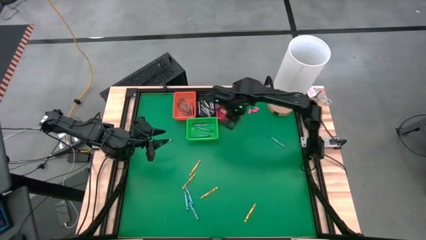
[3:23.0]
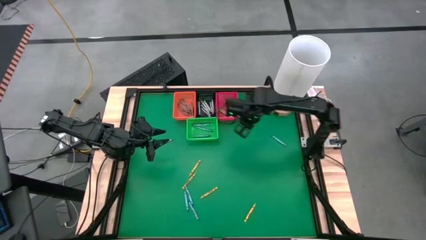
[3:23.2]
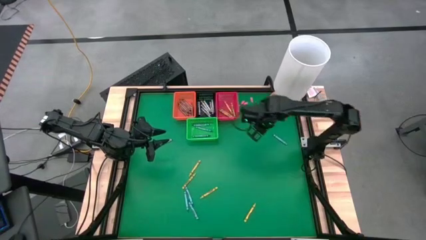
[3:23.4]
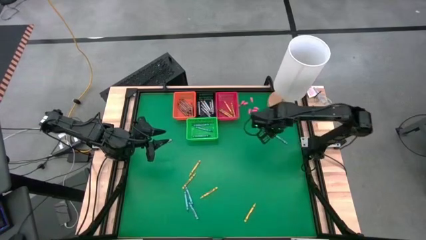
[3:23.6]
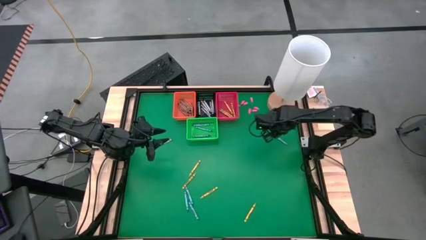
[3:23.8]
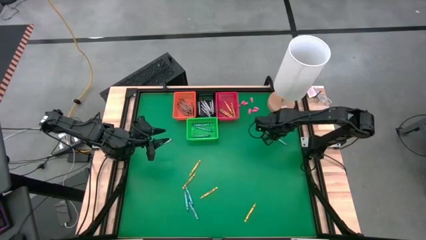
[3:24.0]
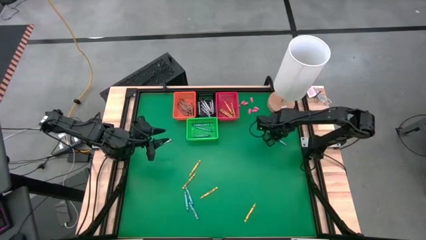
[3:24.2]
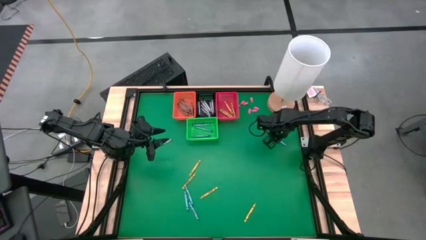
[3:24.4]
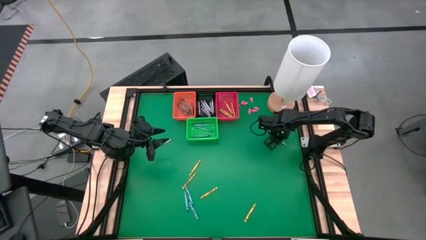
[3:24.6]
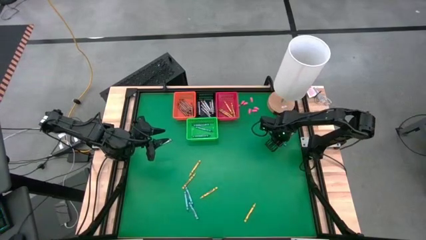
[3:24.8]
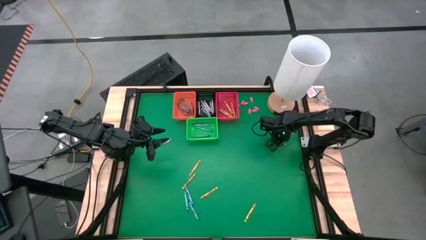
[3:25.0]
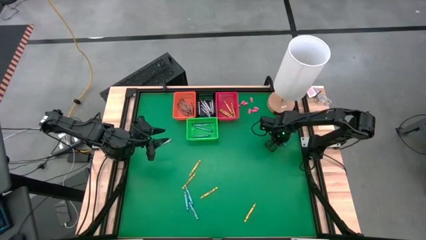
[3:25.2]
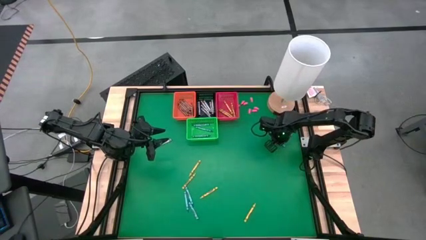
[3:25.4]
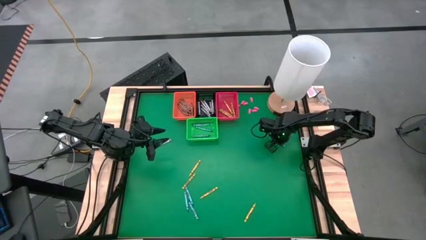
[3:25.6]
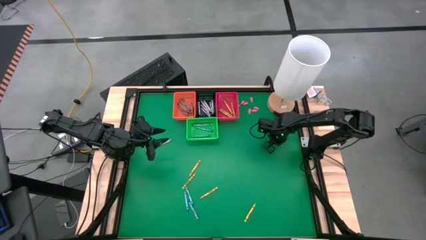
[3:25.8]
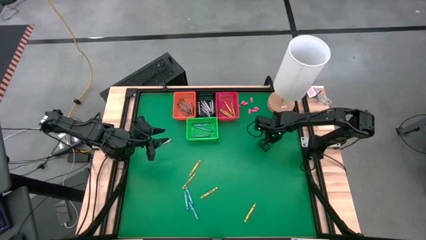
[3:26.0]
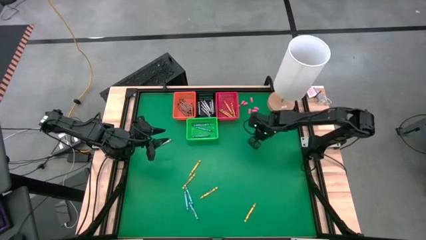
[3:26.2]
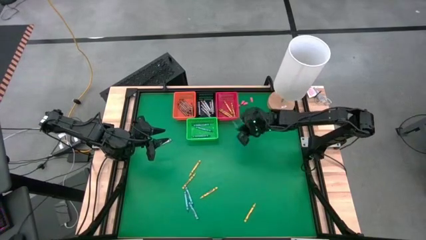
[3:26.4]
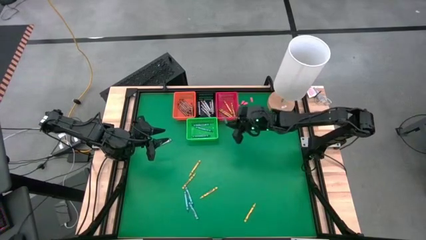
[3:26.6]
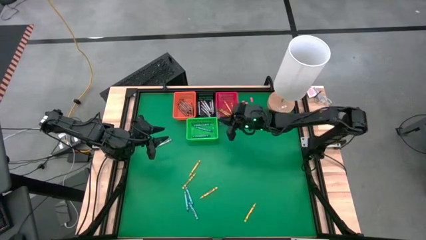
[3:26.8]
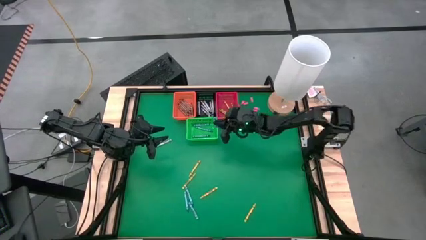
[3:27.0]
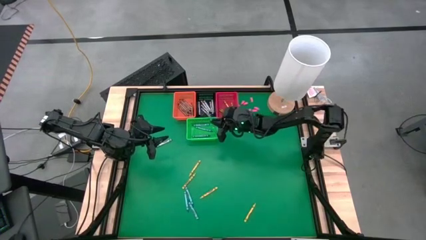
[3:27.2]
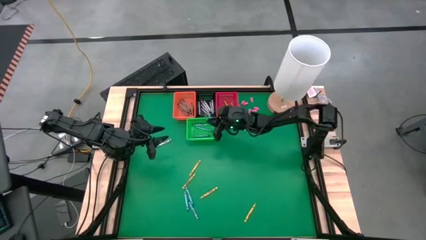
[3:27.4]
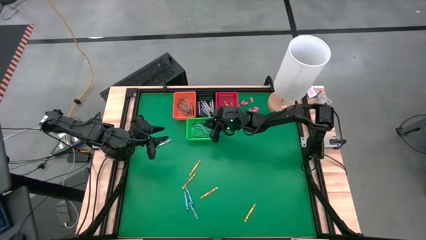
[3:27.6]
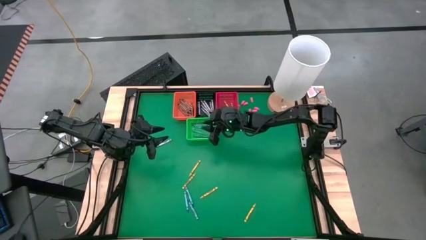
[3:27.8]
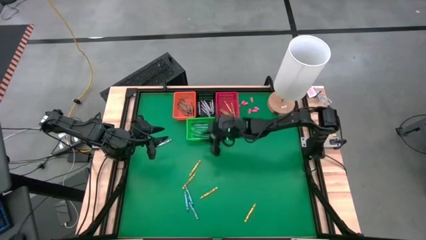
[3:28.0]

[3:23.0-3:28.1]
Task: Sort crayons
Put a blue crayon in the green basket

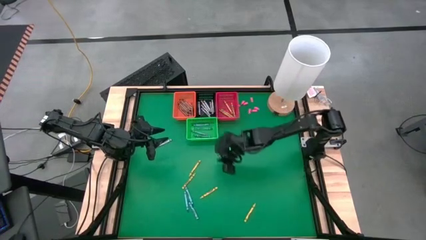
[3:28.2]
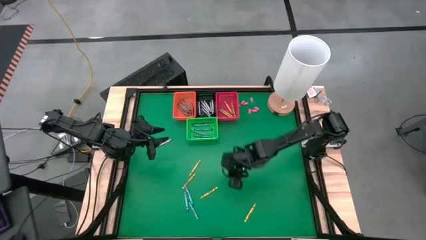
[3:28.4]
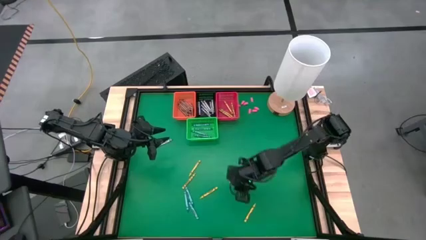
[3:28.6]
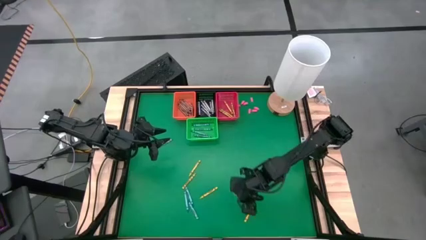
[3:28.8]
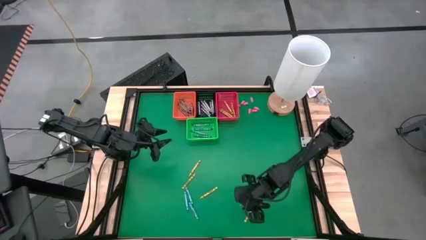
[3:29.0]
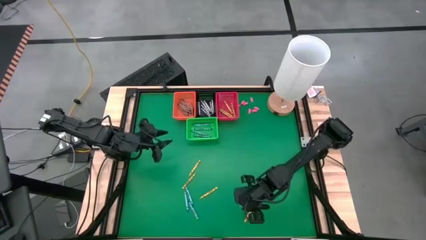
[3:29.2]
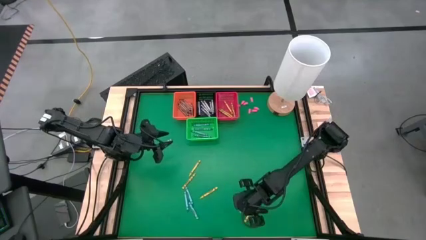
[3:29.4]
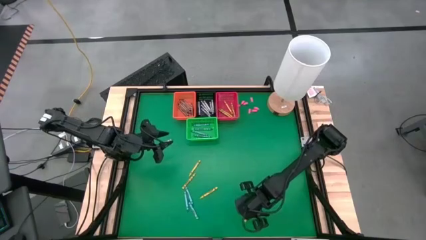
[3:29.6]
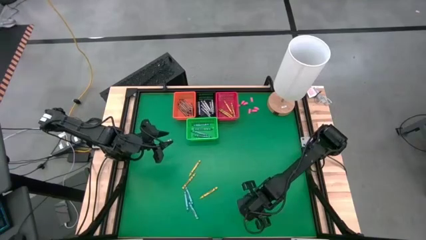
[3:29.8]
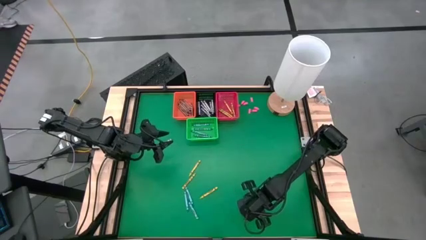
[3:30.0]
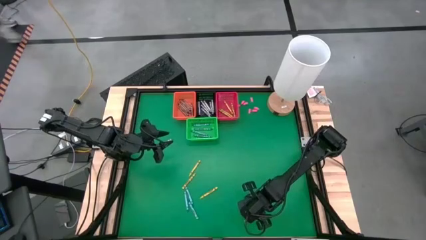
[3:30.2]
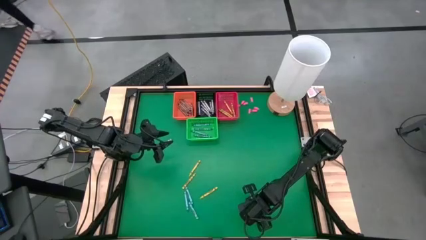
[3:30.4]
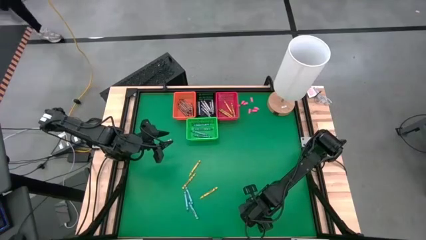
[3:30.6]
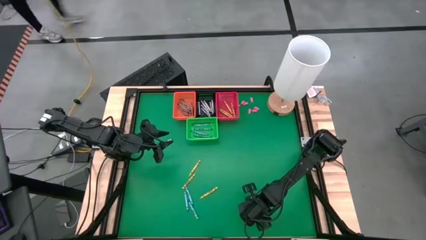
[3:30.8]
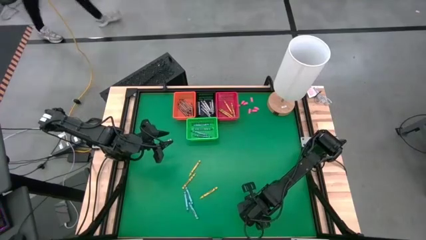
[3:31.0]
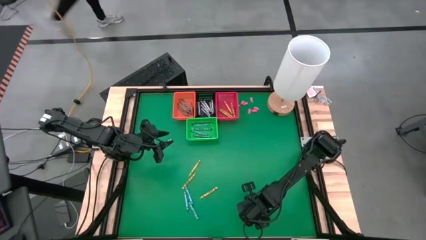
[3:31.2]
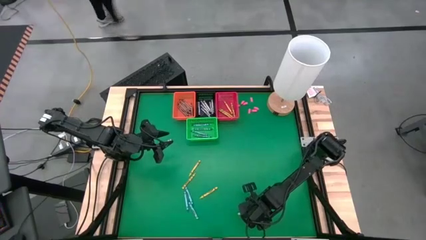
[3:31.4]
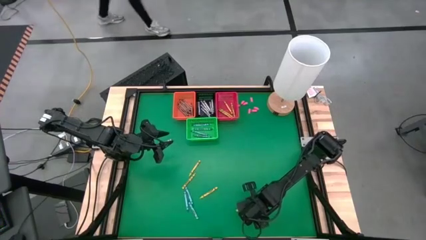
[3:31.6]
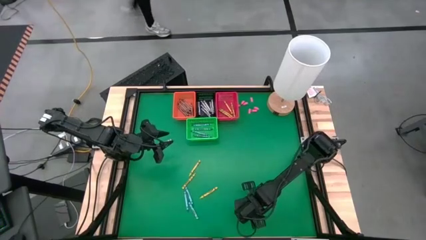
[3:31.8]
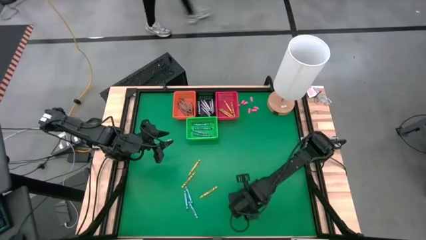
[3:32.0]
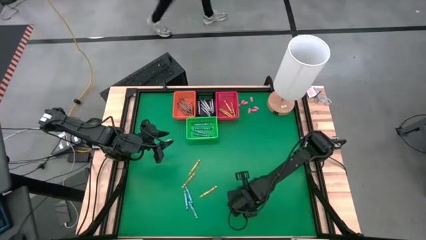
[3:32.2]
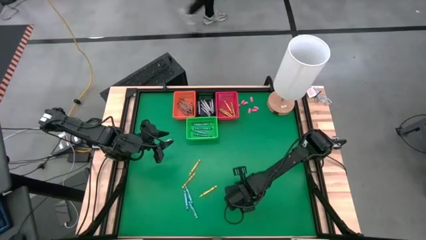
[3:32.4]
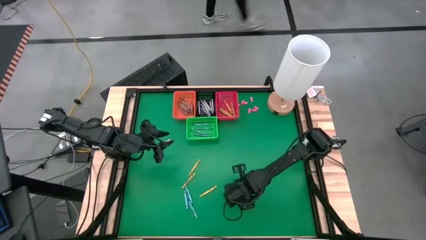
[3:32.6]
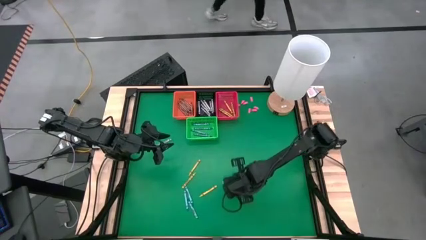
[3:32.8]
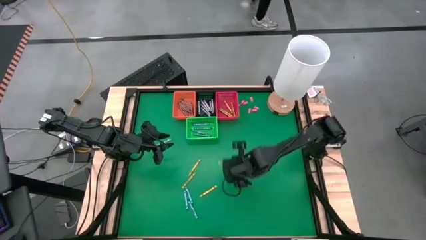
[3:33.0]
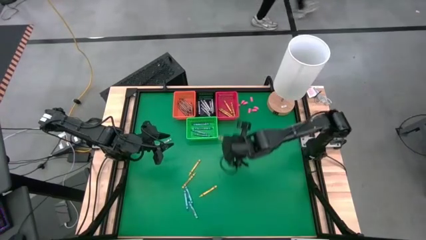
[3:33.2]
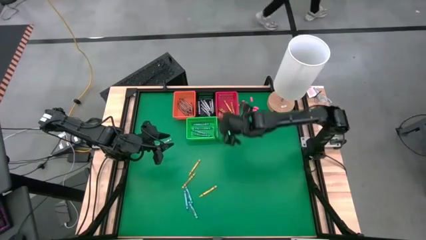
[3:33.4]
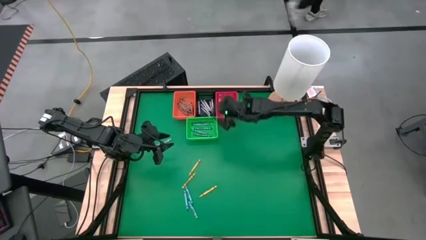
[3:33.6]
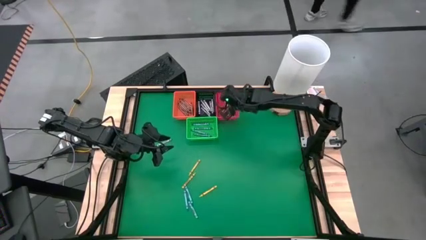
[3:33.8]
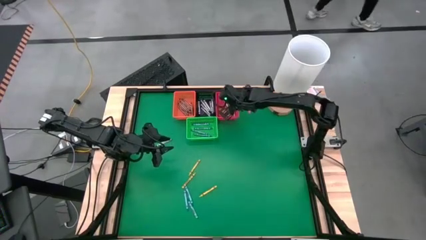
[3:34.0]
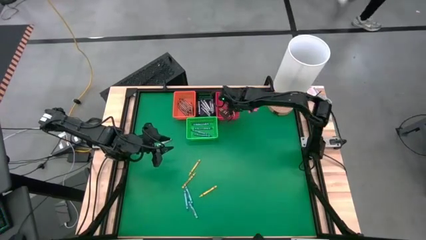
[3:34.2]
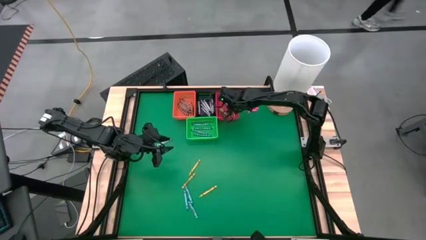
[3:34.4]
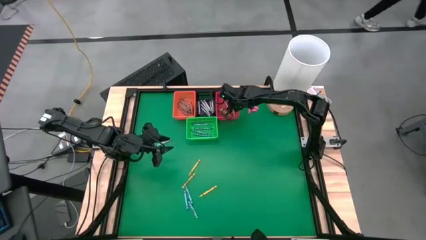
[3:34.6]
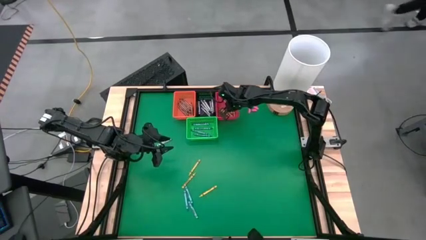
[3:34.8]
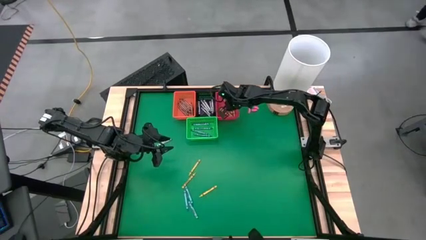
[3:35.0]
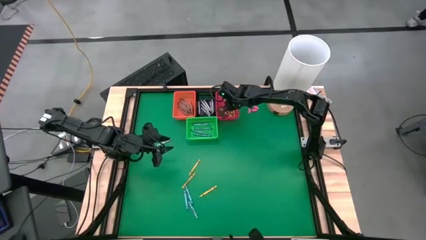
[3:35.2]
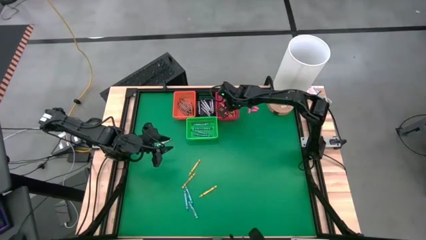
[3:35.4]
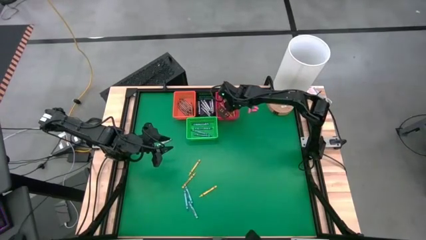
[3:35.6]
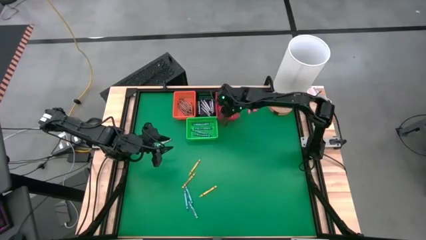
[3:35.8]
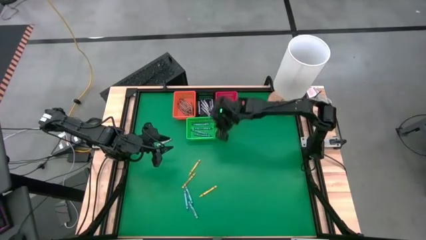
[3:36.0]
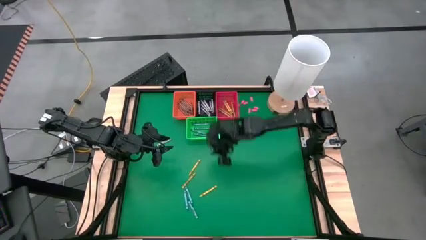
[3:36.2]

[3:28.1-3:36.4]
Put a yellow crayon in the red basket
